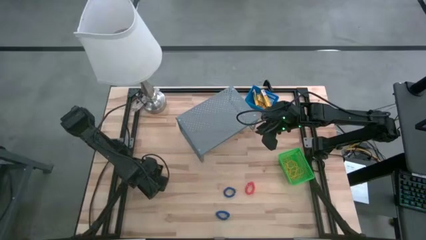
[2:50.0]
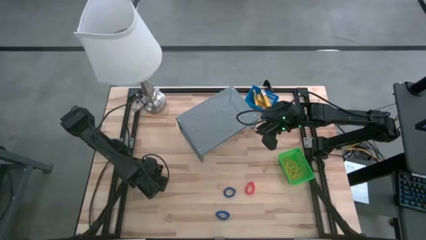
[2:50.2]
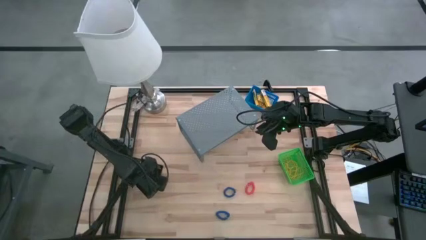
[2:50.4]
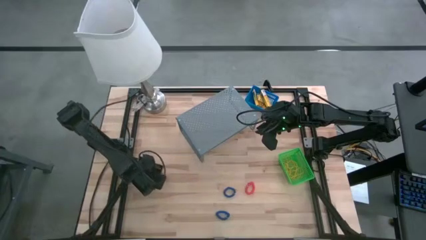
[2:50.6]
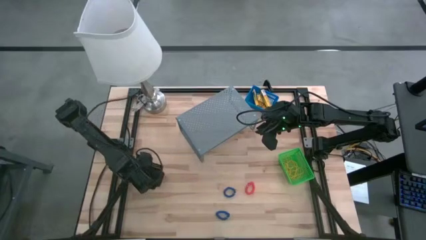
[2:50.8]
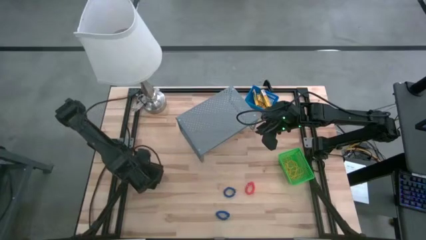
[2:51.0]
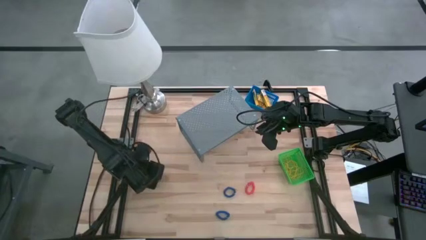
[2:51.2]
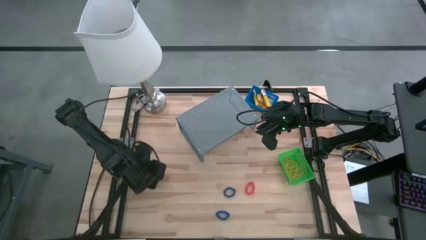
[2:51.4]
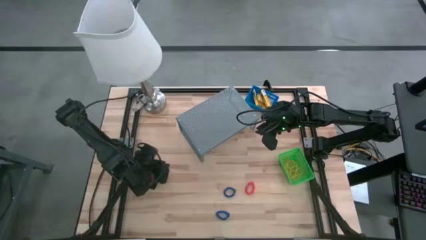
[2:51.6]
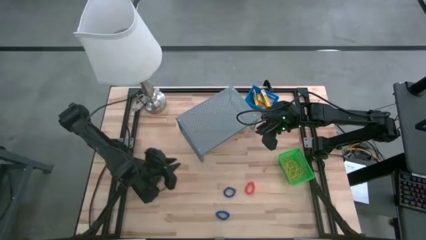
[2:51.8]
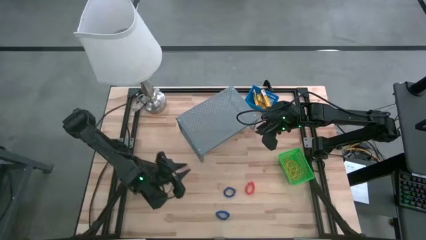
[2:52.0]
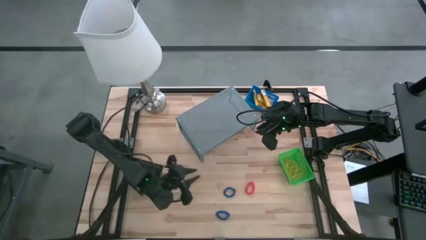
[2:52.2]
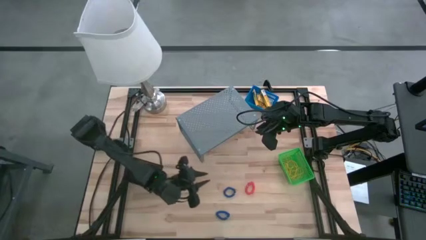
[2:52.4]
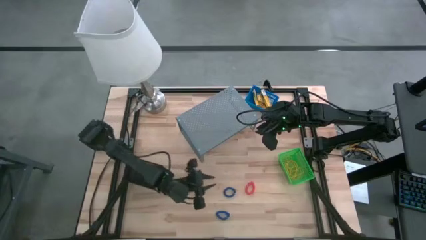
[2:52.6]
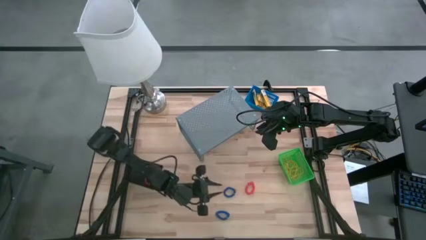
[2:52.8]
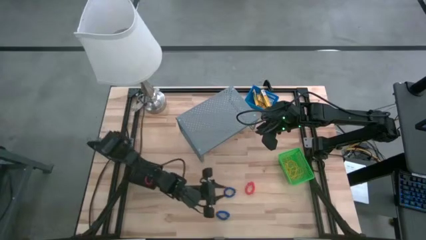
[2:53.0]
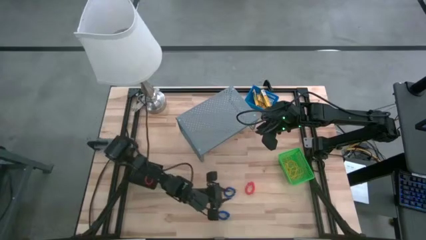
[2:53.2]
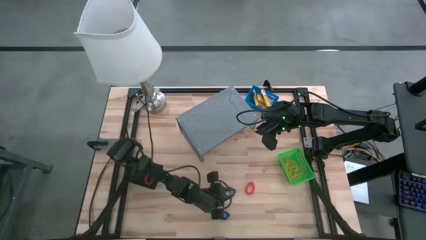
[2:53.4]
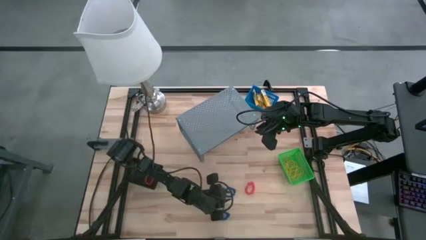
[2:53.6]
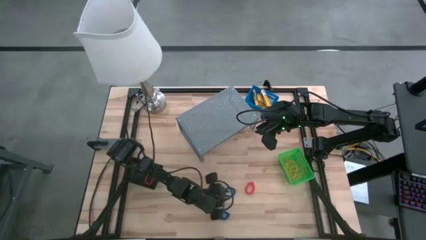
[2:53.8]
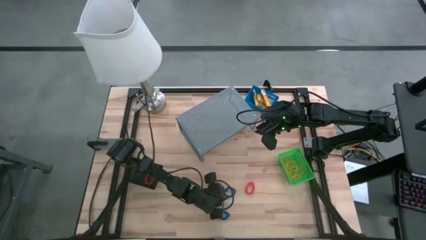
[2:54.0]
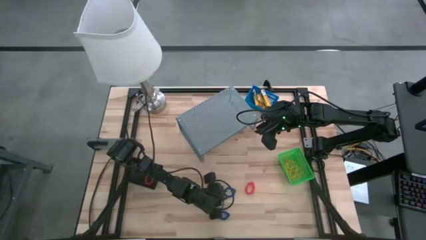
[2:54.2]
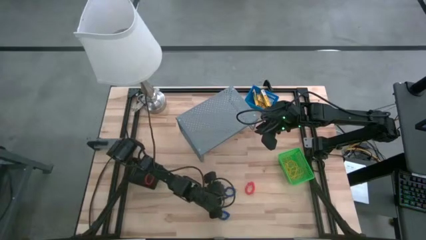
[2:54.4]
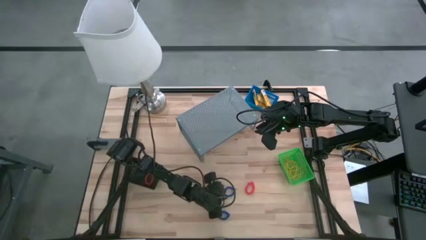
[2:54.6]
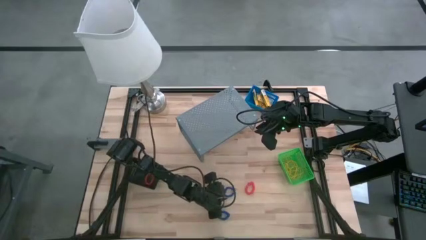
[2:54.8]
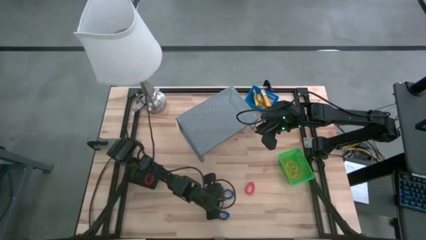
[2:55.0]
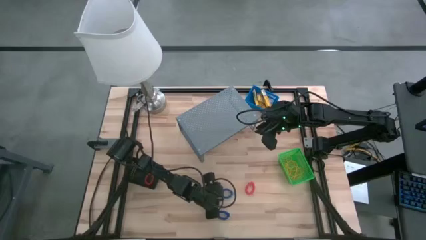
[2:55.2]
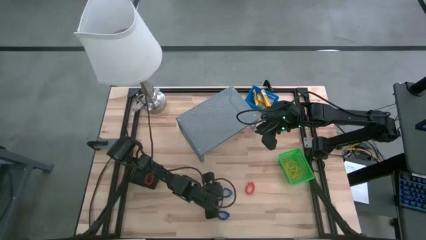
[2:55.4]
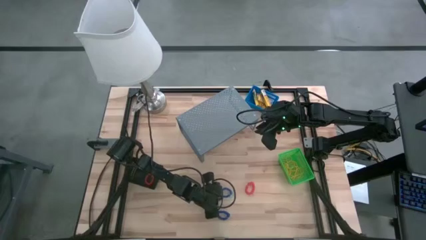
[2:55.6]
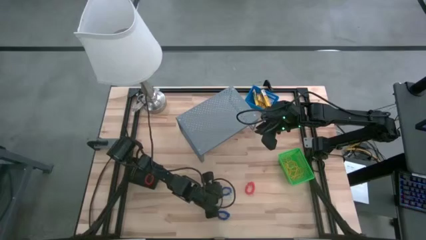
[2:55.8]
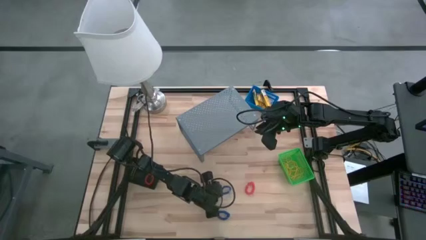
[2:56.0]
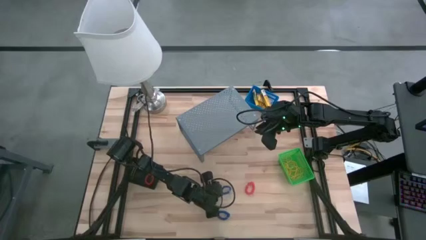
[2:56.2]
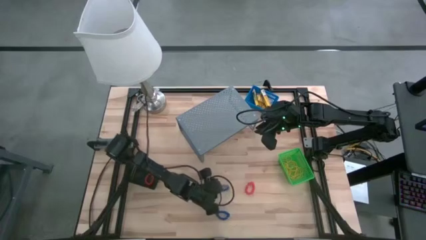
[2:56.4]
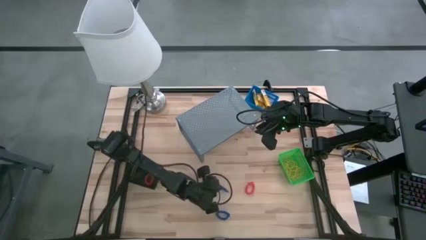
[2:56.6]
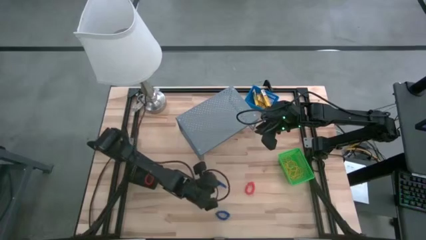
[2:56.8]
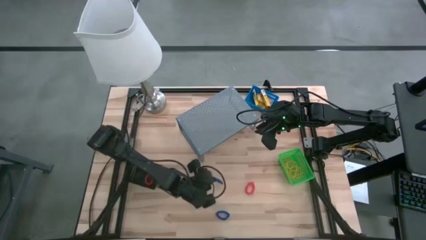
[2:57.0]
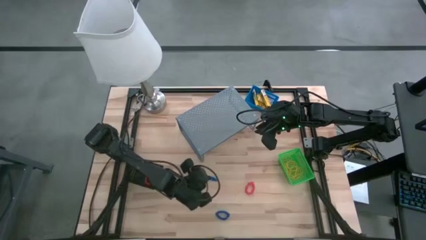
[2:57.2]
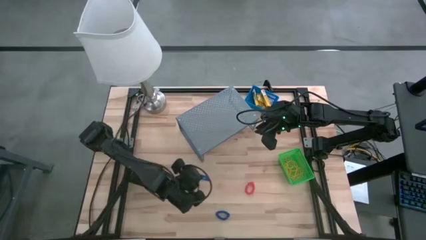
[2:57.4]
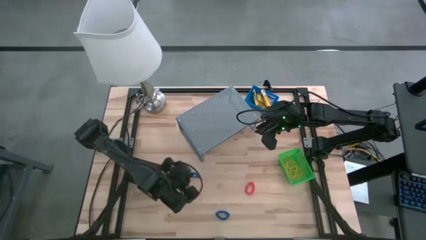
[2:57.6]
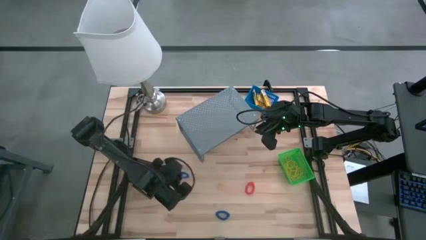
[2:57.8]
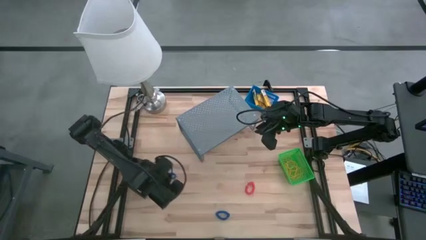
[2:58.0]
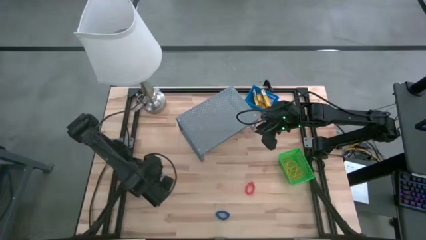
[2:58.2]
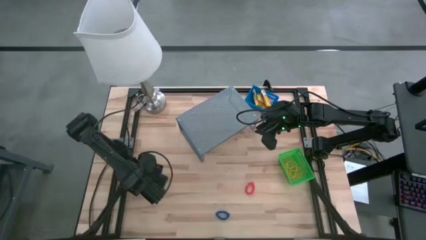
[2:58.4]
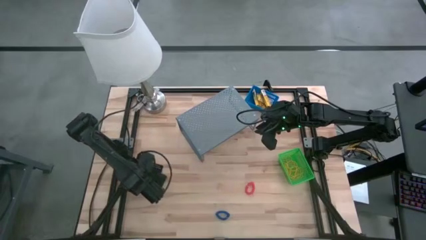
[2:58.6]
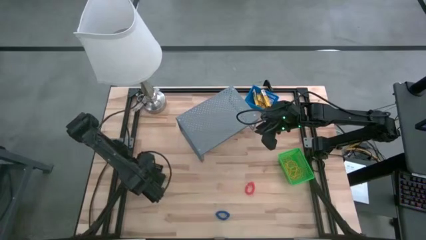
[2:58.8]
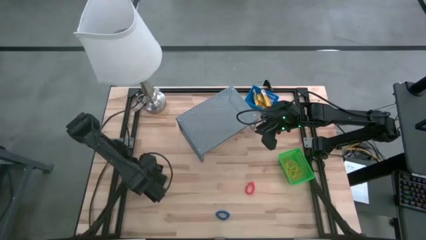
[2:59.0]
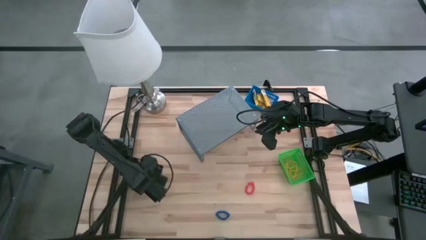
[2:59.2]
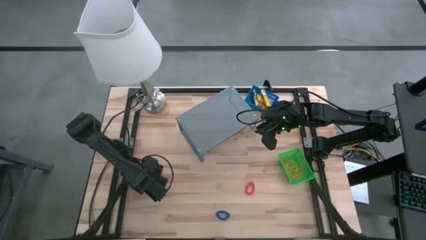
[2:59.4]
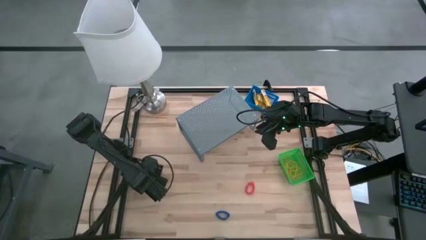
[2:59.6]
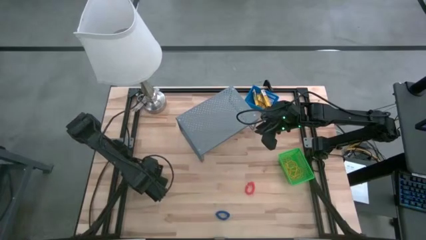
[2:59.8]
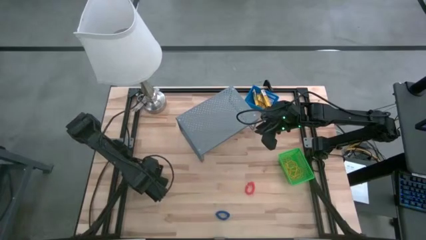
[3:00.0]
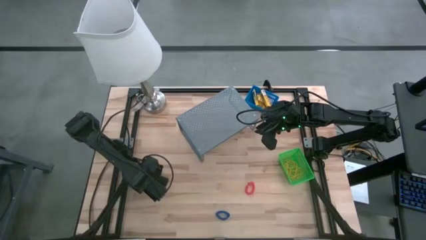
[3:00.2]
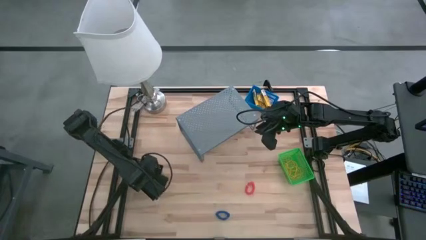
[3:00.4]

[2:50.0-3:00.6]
Task: Pick & Place Office Desk Supplies
Put the blue spring keychain into the black basket

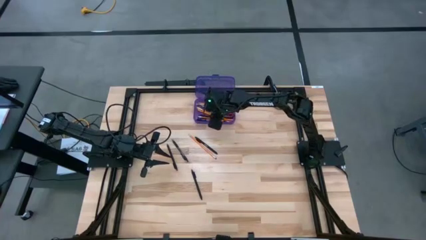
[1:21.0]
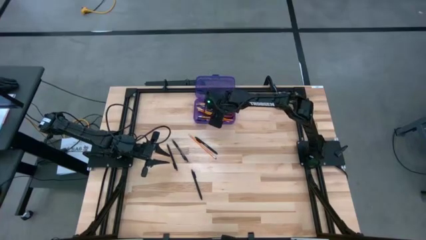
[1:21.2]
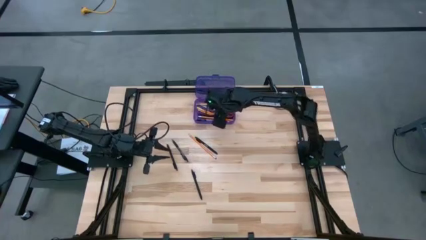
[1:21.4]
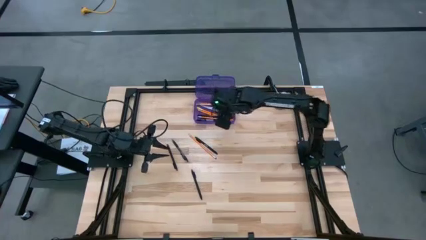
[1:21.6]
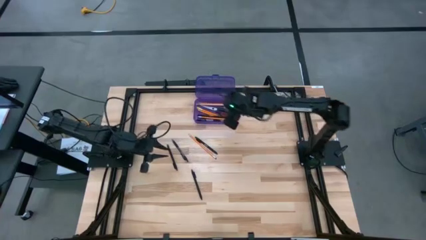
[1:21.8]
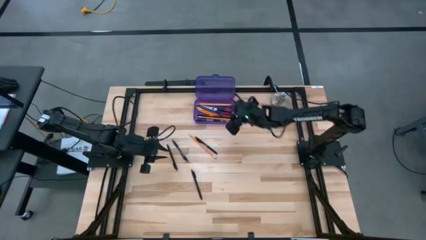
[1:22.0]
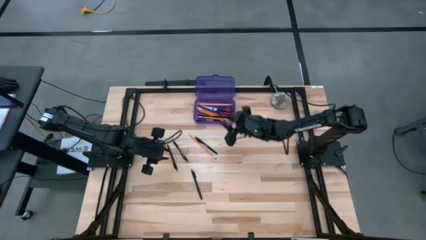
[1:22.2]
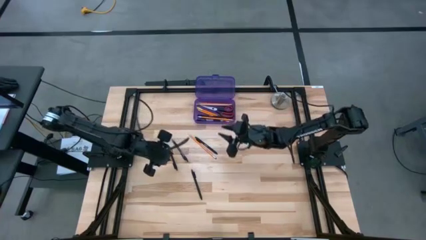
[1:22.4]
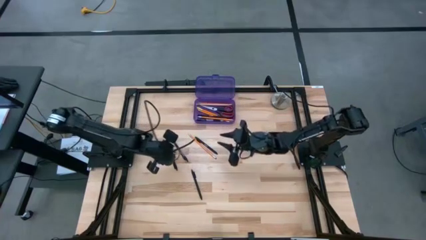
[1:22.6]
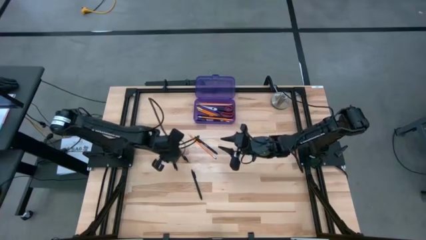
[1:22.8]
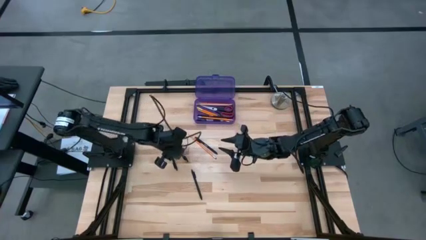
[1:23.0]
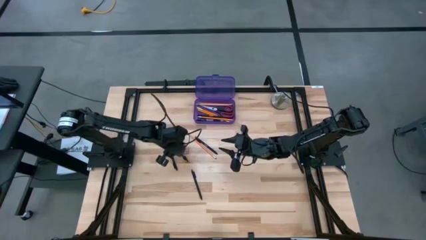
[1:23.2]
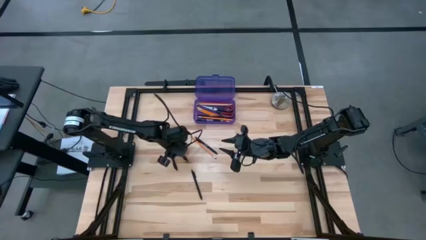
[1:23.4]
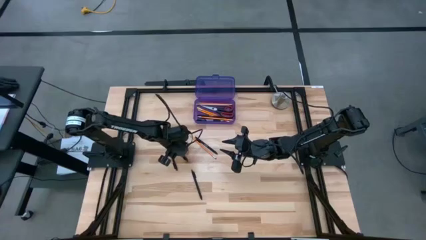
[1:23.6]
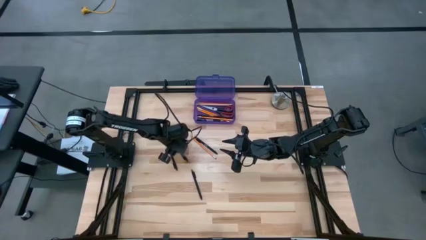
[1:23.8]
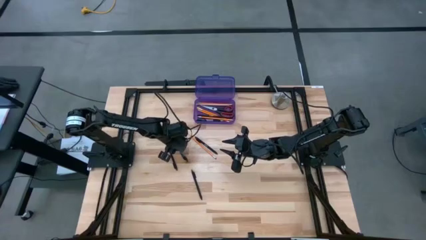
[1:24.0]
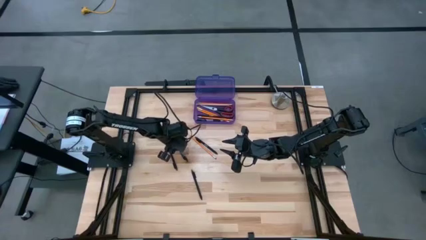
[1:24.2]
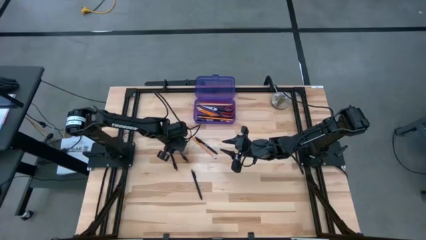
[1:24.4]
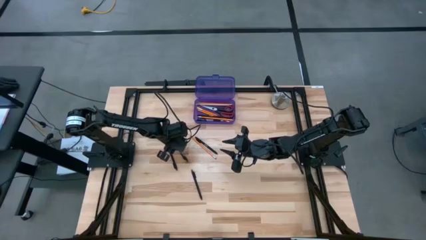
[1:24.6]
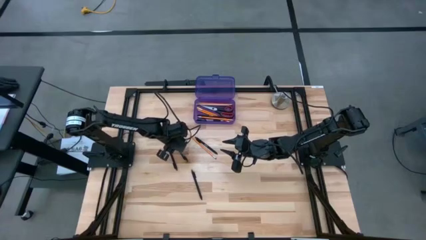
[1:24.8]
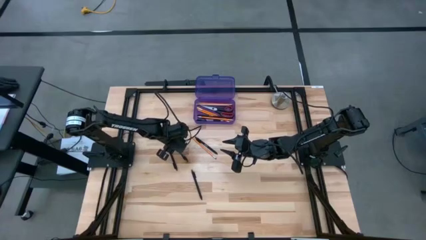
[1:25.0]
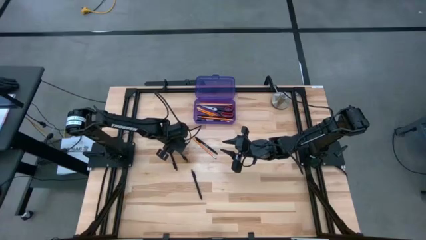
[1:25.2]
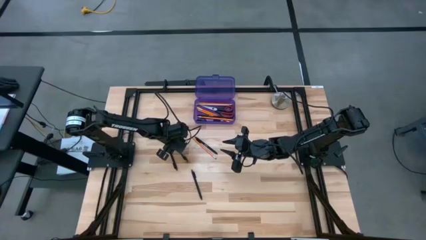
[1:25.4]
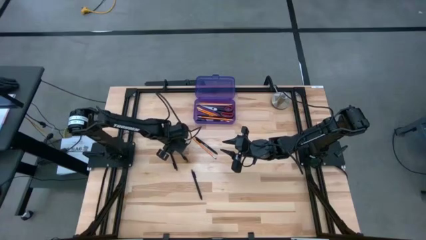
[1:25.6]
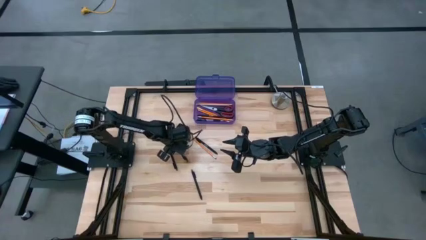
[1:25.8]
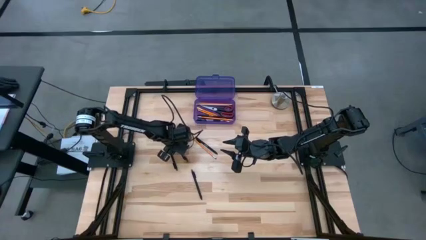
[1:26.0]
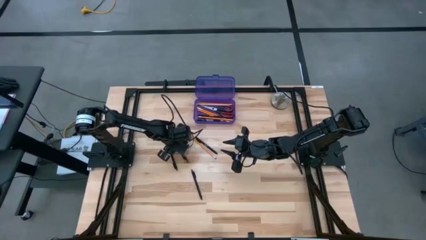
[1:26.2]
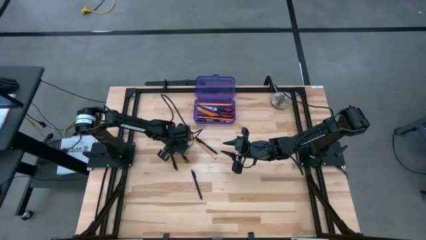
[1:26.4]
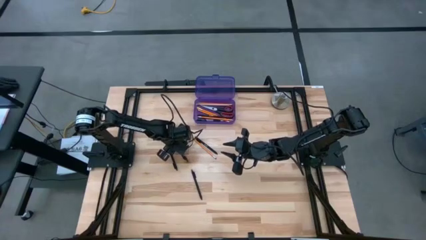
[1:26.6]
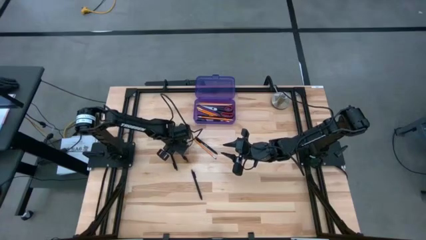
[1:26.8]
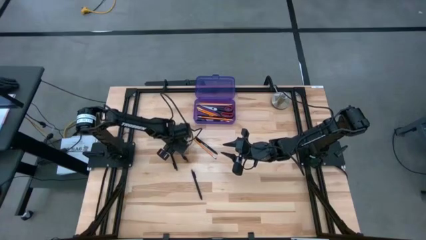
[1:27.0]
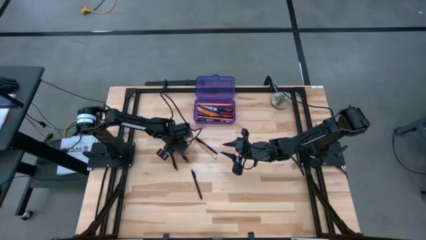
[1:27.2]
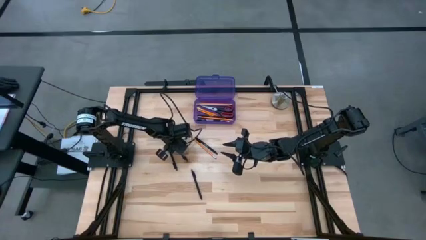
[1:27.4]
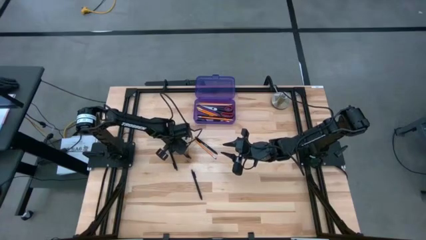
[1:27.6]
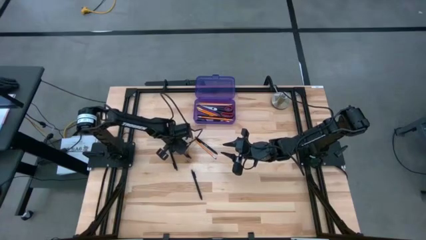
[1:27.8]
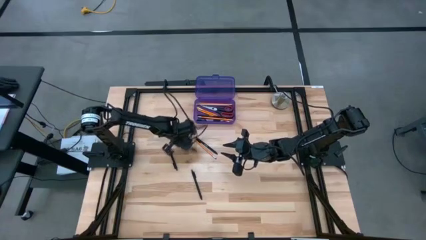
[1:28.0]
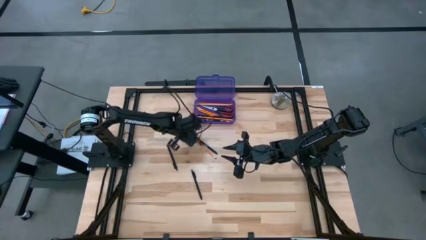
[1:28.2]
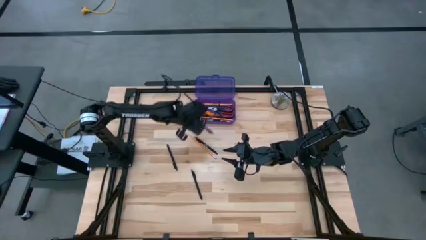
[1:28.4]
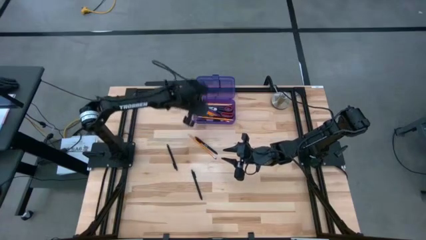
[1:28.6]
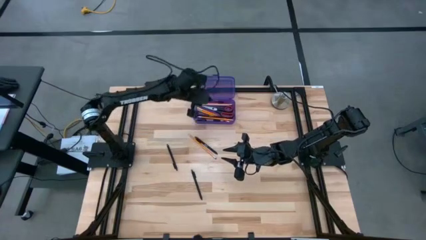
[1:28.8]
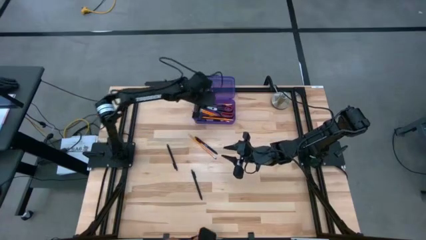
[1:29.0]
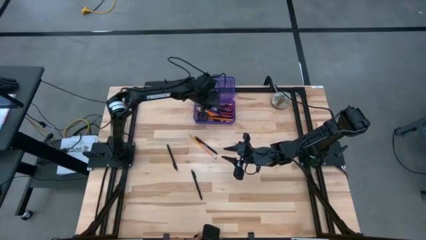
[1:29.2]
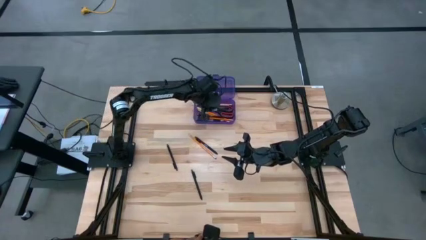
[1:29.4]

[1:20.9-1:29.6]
Task: Pick & place school supplies into a supply box
Put the black pen into the violet supply box
